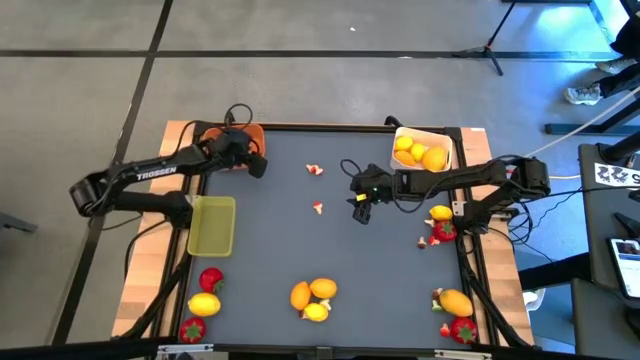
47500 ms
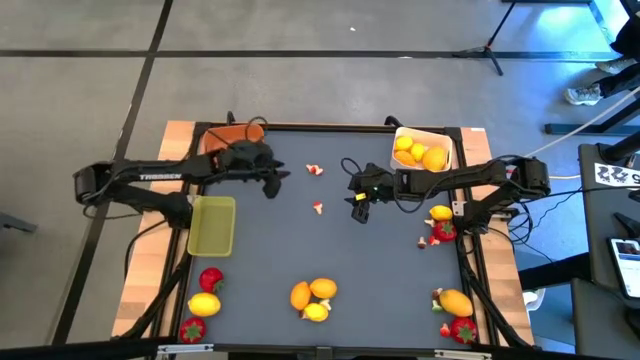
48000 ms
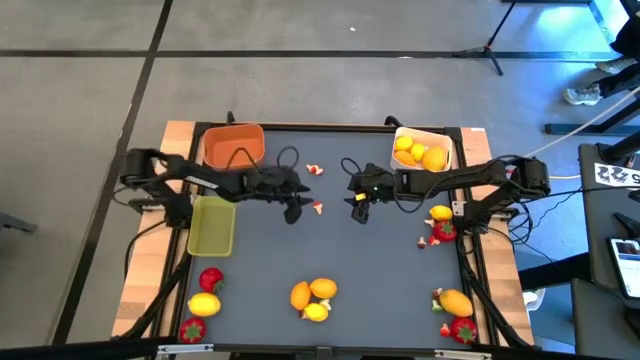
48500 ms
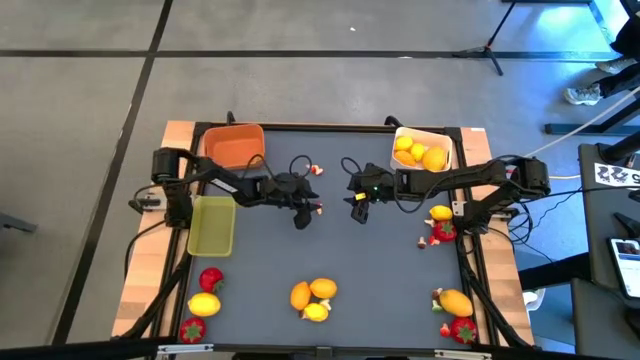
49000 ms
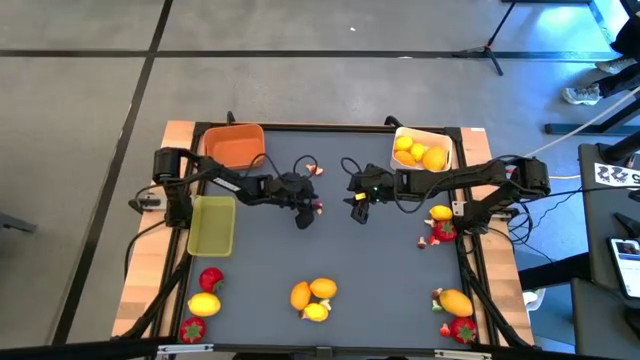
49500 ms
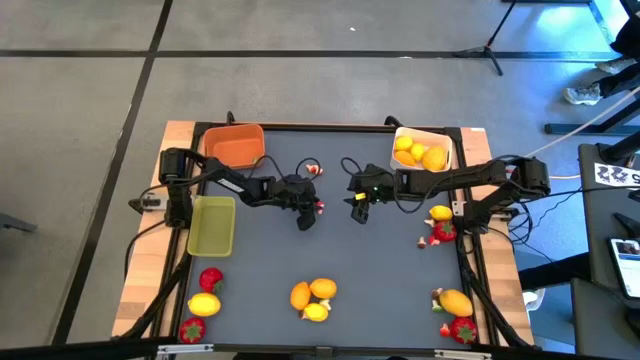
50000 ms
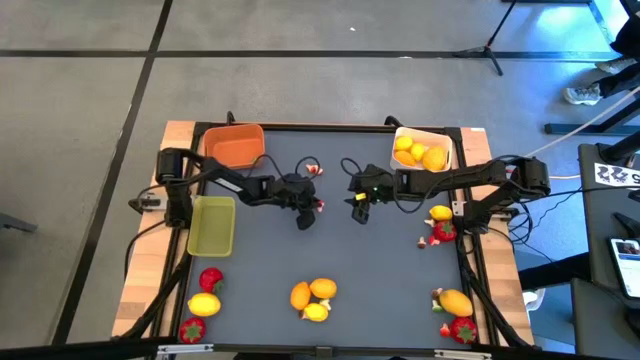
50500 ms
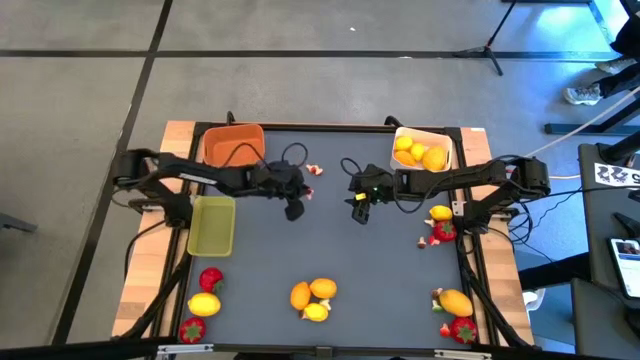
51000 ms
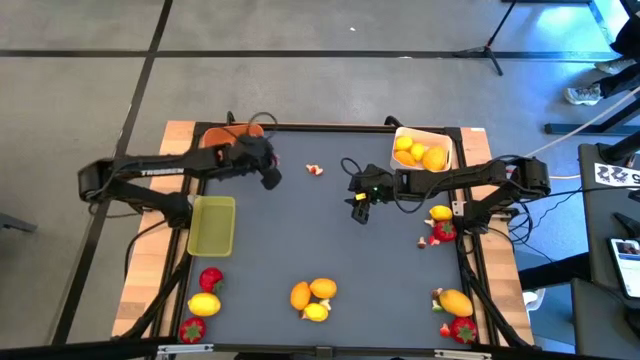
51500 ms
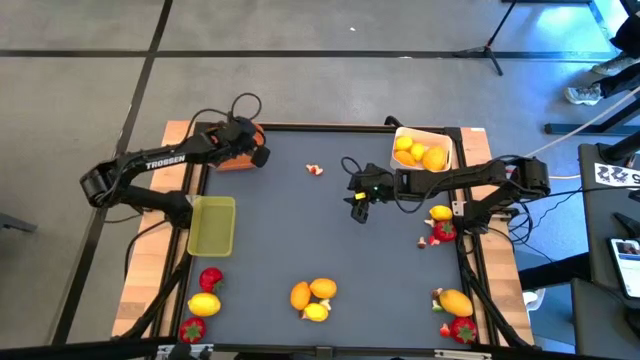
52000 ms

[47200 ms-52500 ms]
Task: Sort produce into baskets
Put the red mushroom into the orange bin

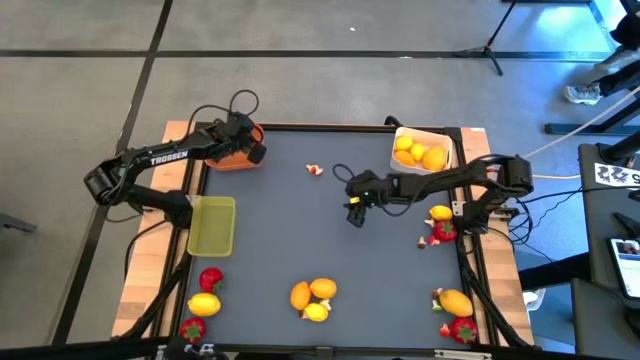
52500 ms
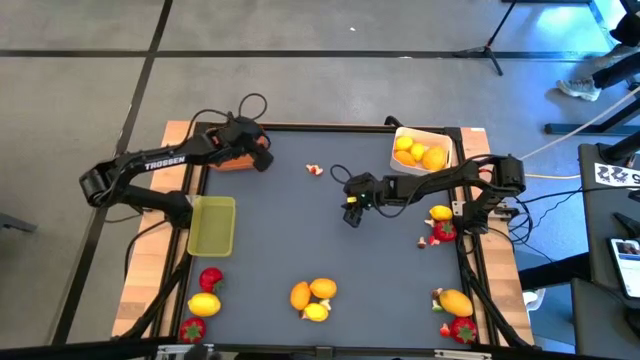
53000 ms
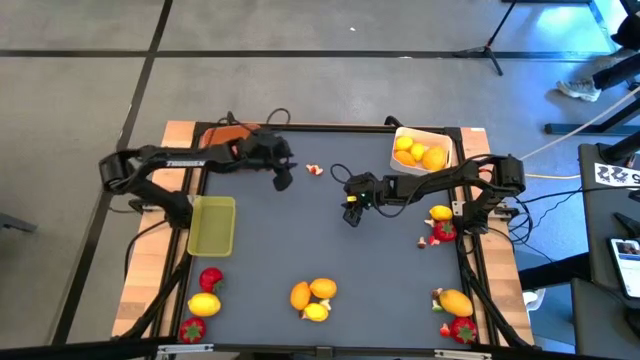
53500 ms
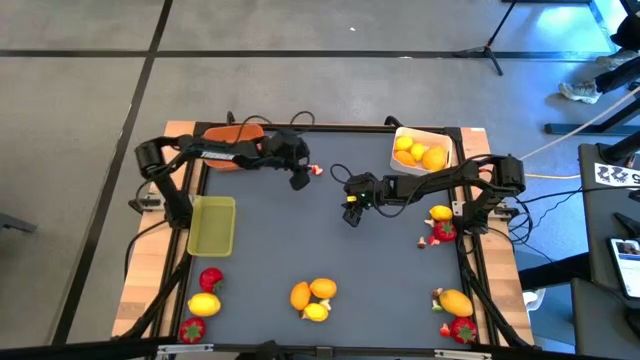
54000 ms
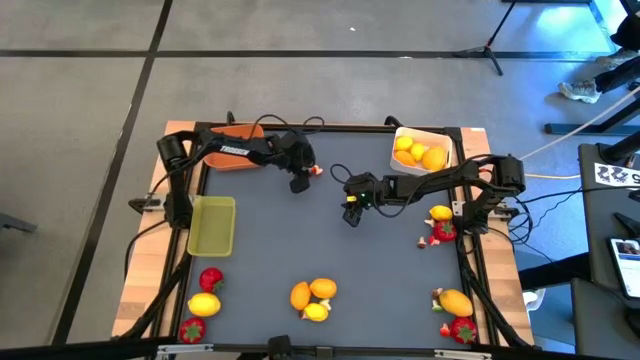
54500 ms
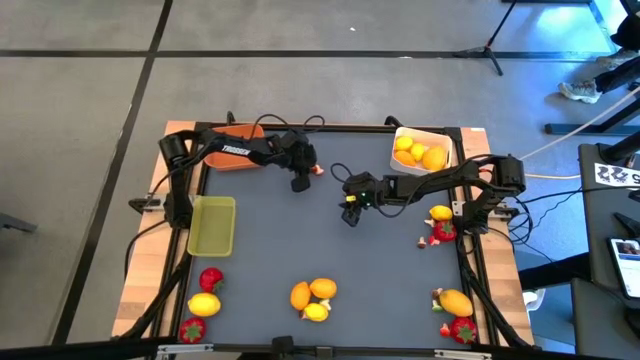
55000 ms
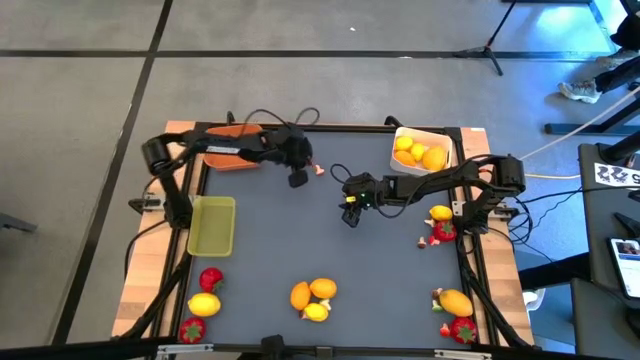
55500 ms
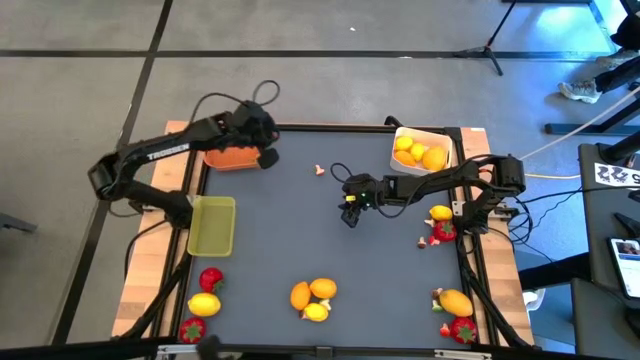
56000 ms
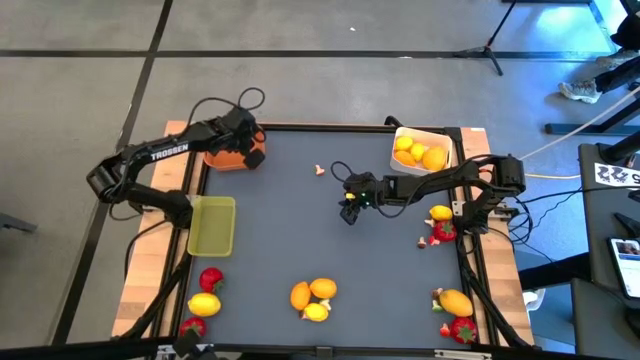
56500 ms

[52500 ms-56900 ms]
Put the red mushroom into the orange bin

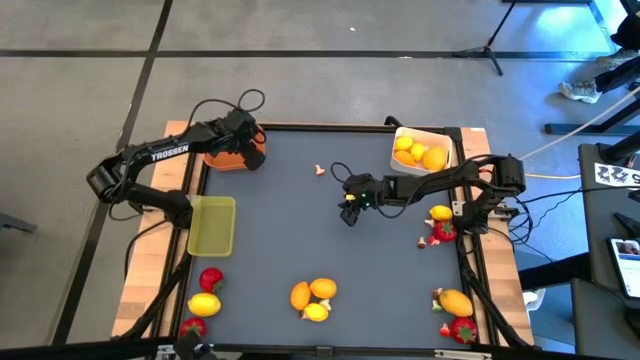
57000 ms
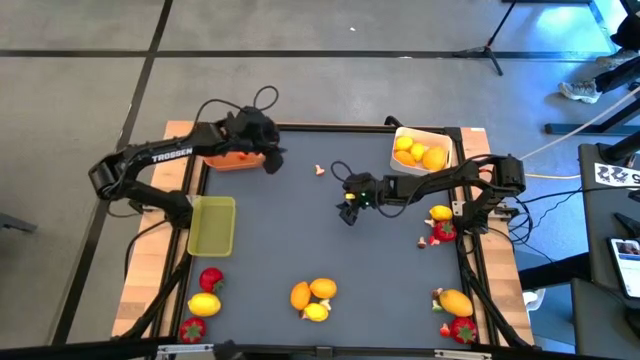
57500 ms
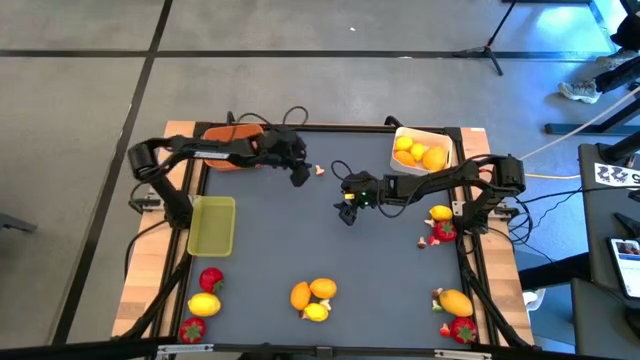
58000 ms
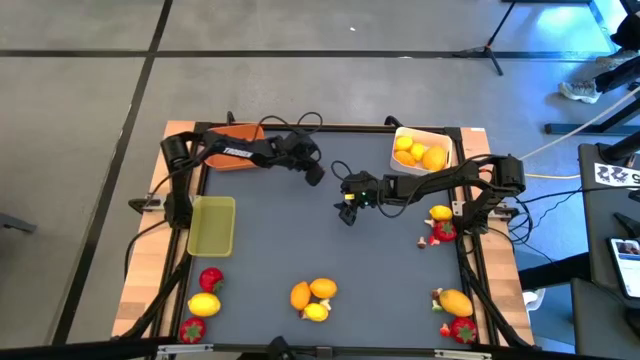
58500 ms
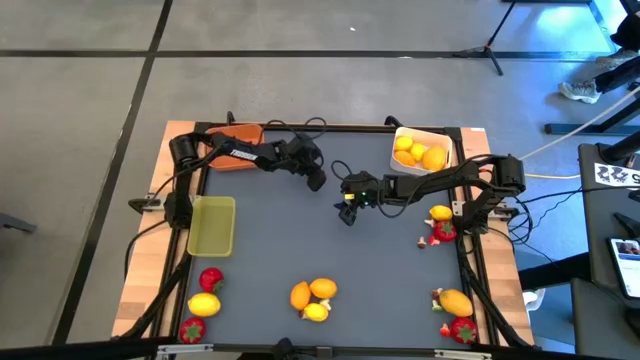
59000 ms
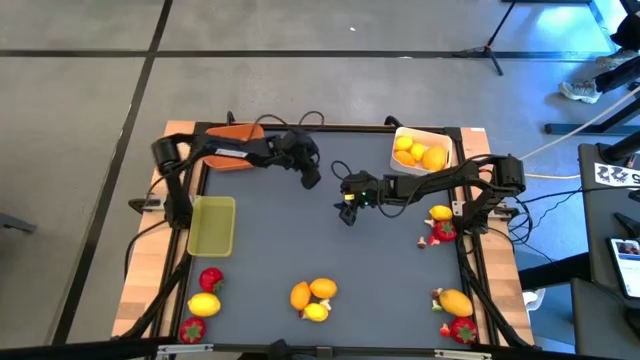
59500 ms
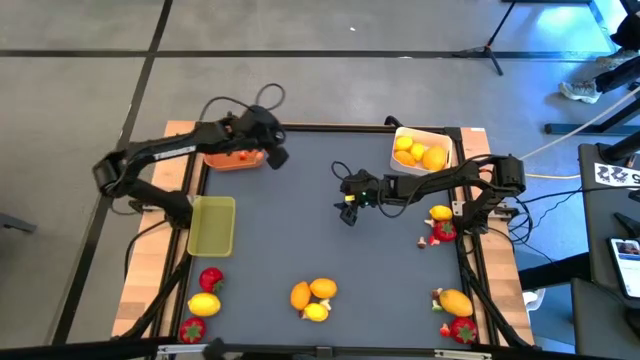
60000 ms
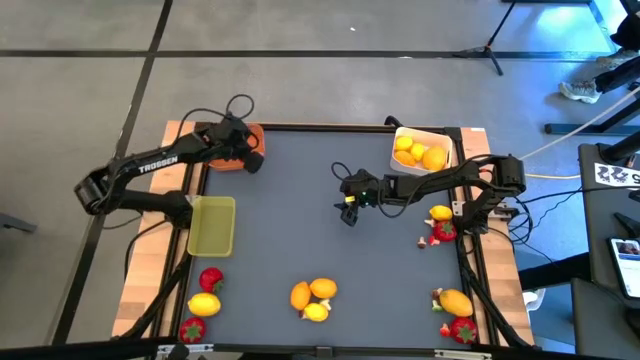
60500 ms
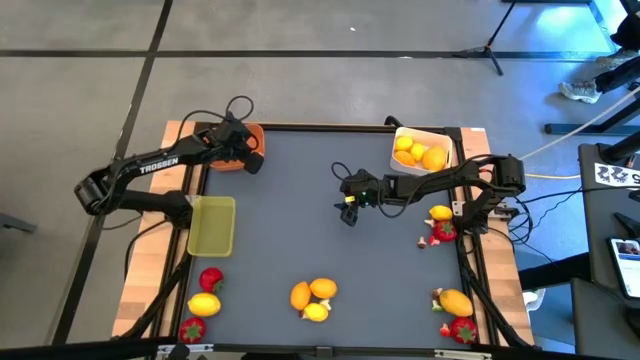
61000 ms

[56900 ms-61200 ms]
Put the red mushroom into the orange bin

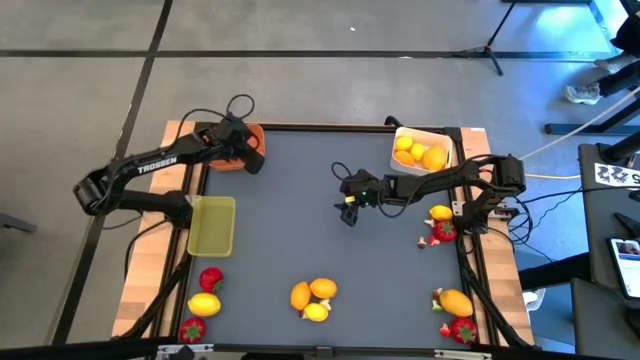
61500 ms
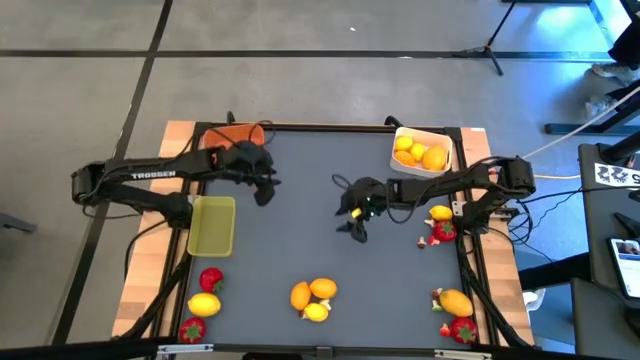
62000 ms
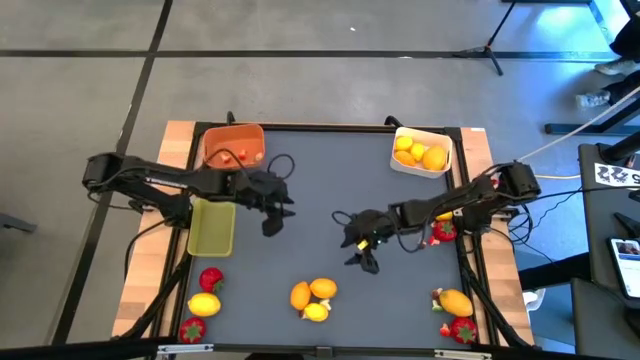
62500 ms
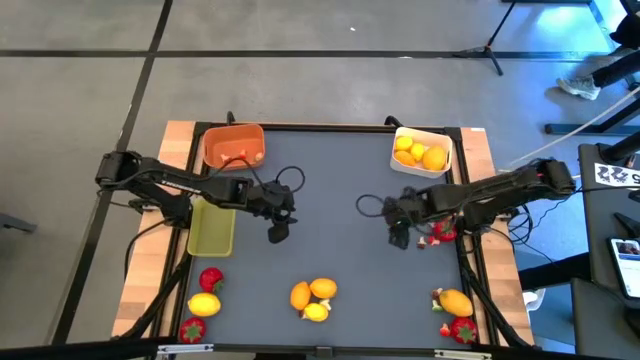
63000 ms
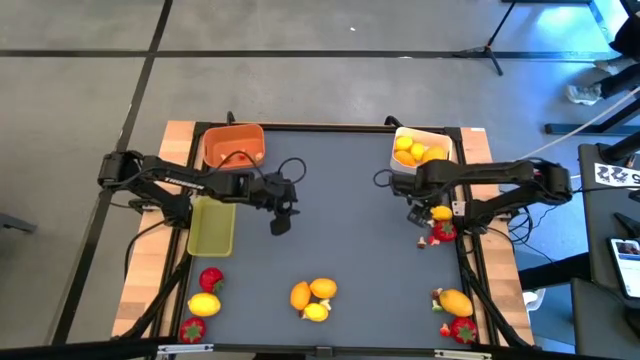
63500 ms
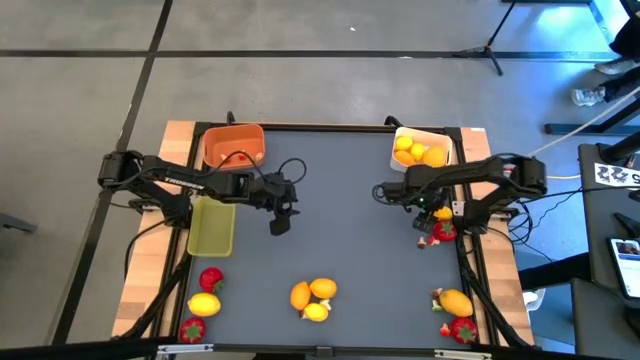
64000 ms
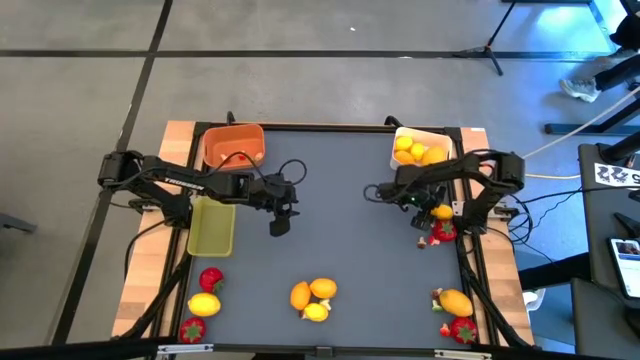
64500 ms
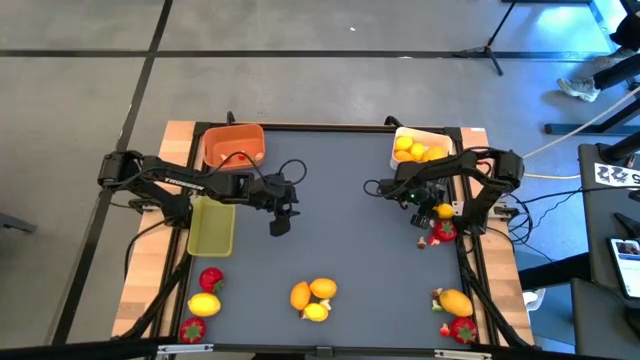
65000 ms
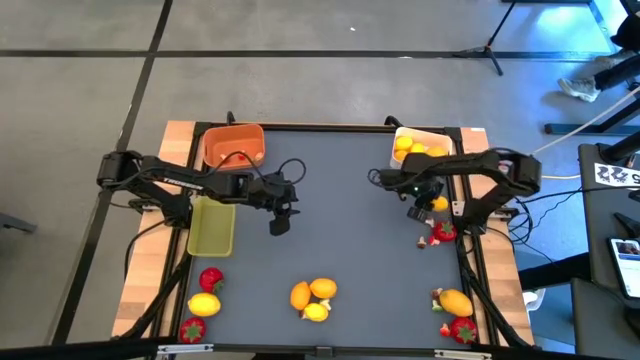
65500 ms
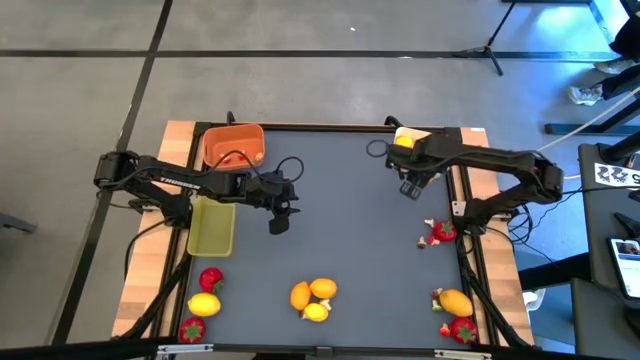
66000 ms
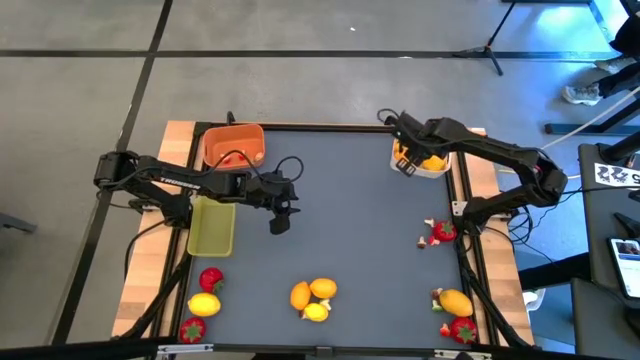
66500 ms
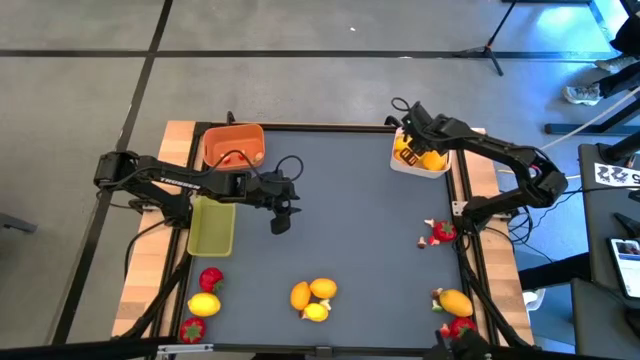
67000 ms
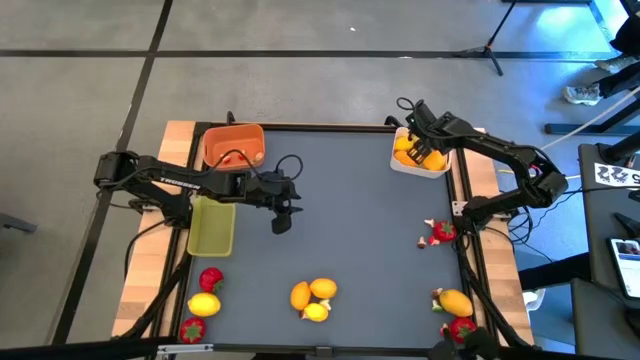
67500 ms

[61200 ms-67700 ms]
Put the lemon into the white bin

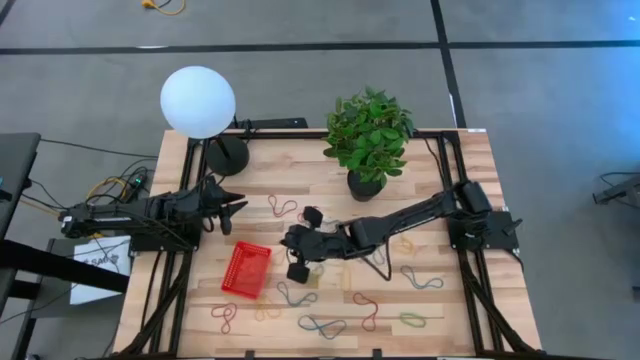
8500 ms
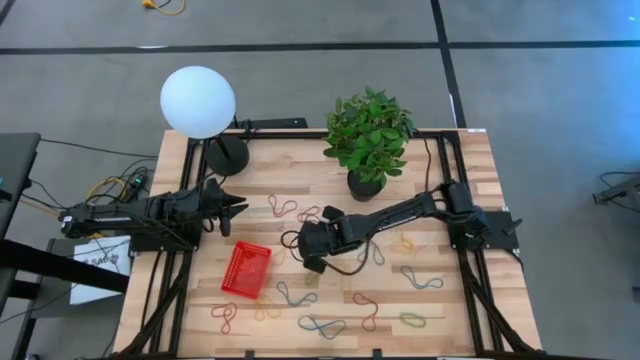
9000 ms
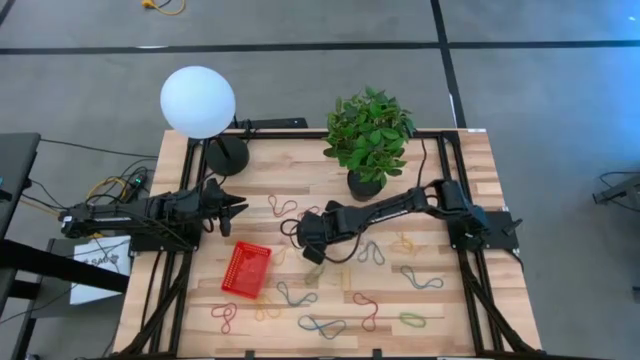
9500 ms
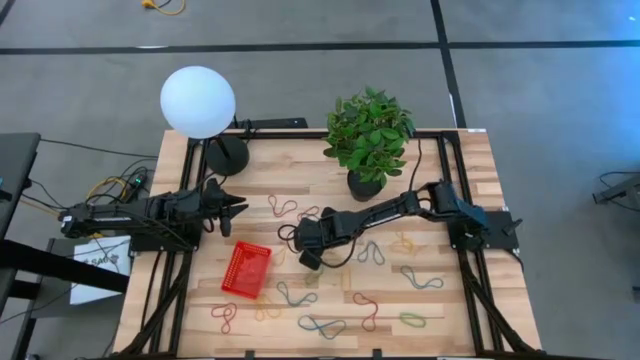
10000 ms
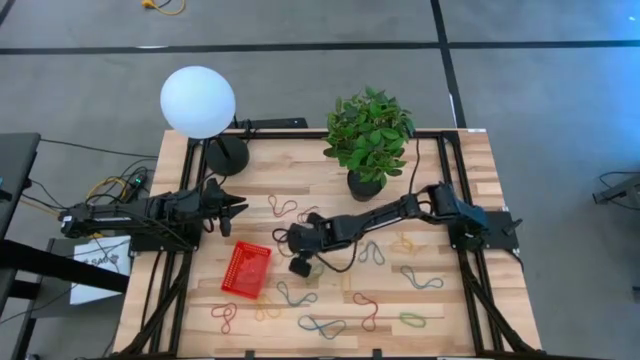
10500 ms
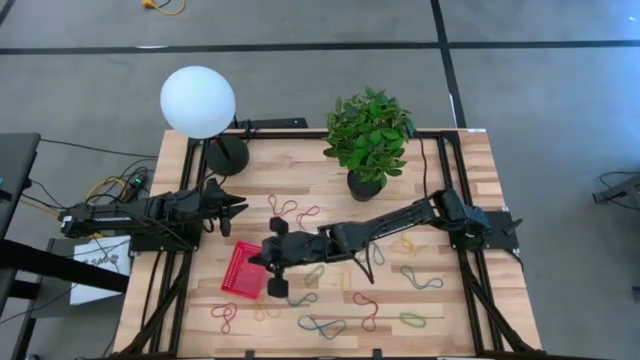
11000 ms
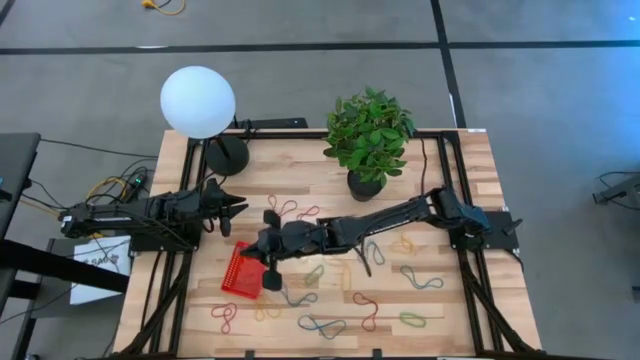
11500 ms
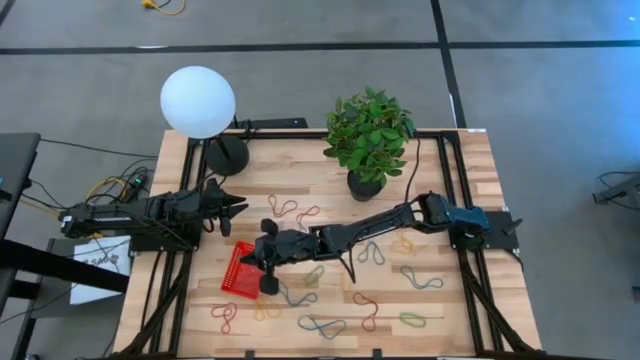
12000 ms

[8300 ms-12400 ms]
Task: Pick and place items into bin
Put the blue rubber band into the red bin
